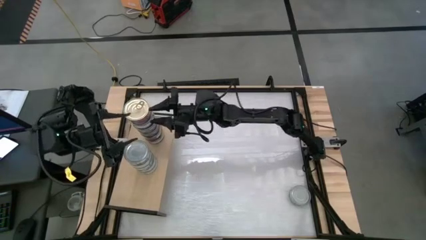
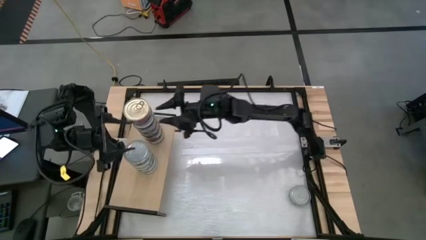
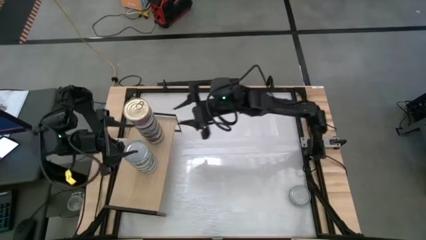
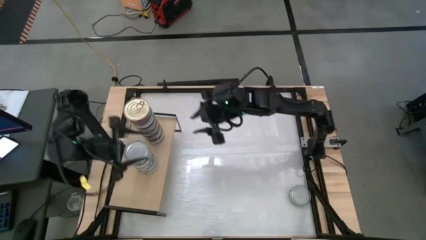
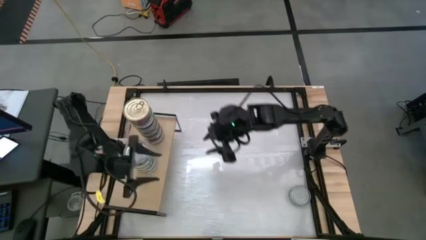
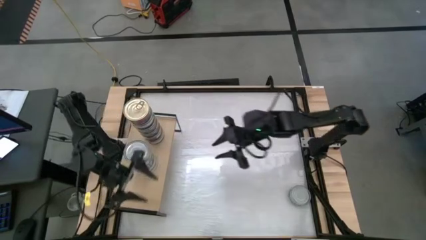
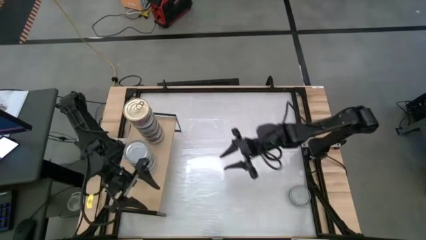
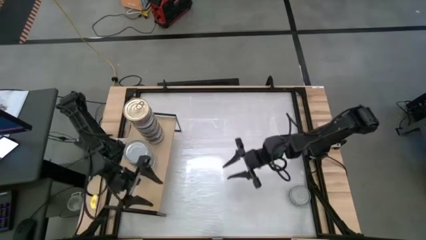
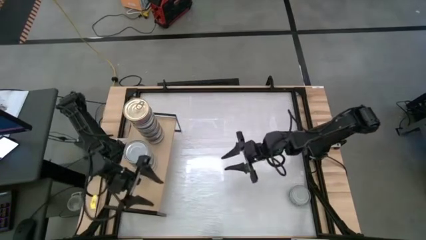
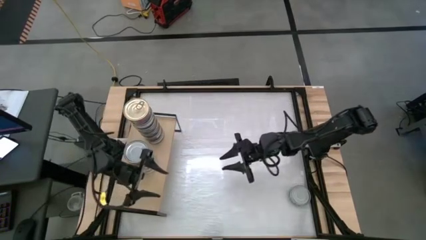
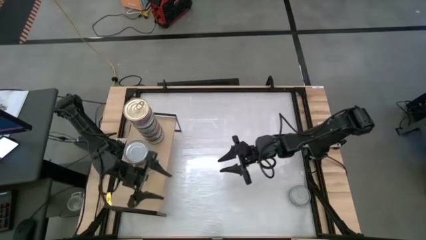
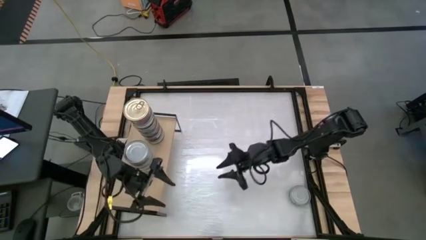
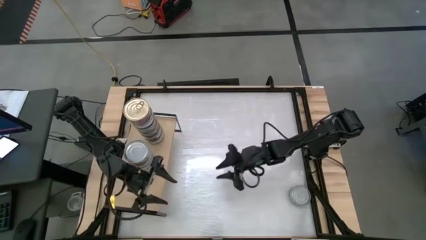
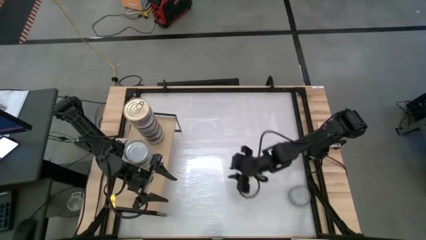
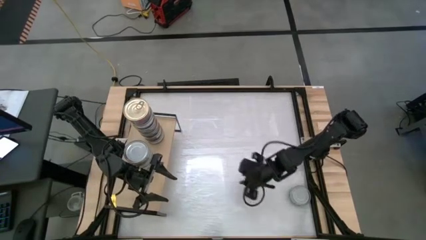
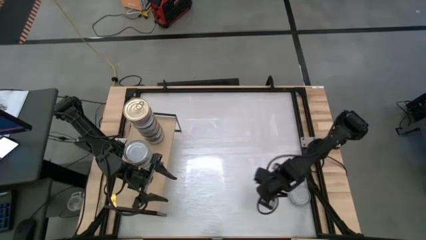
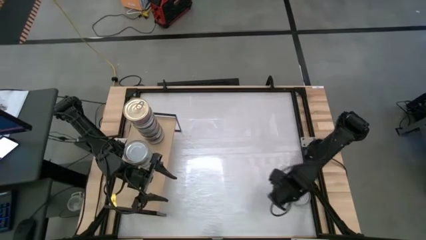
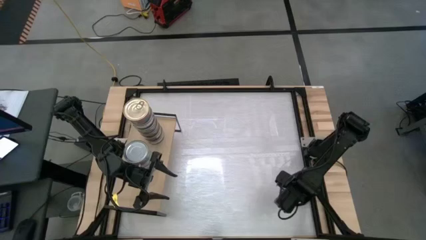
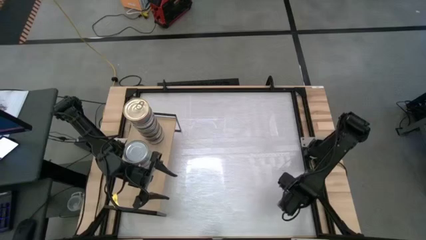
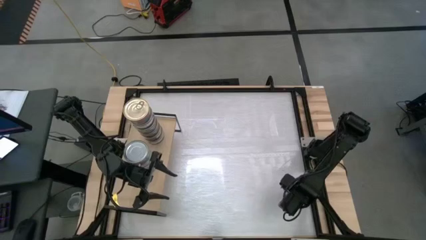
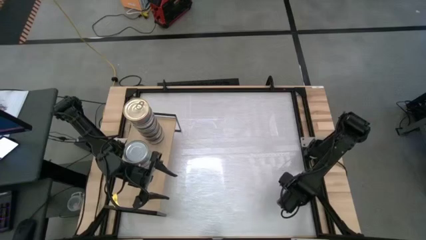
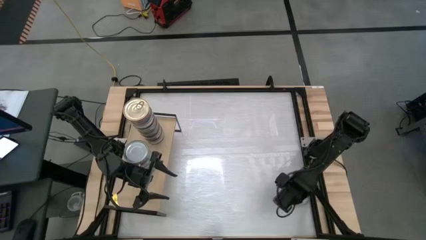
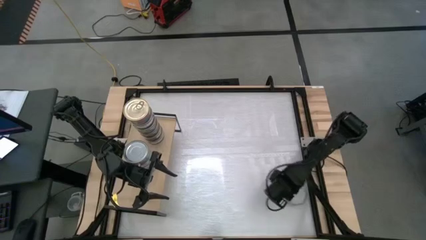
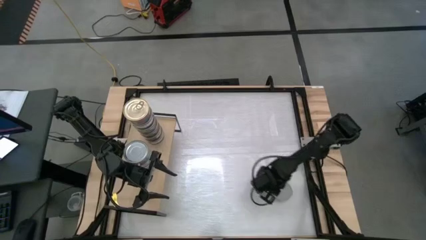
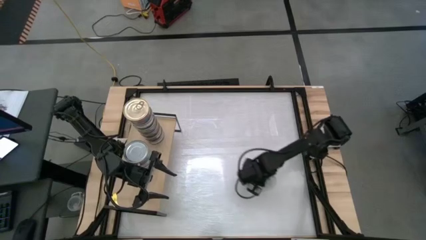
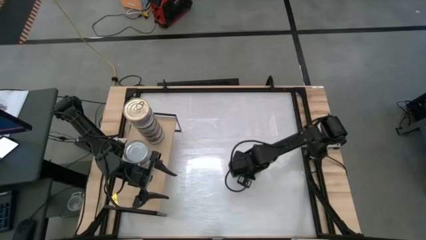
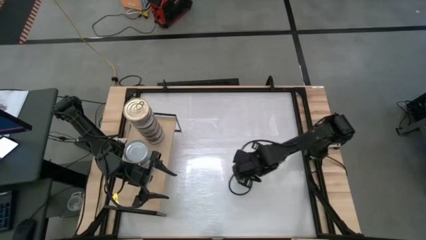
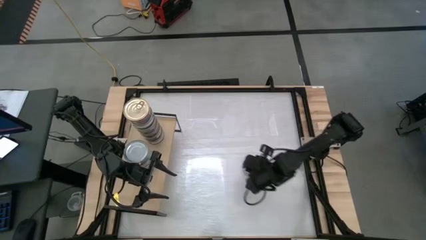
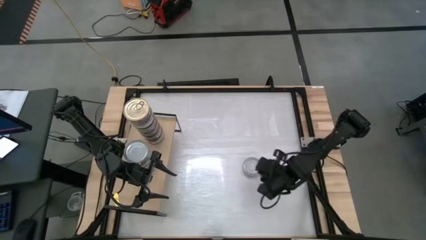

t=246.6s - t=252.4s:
Task: Stack canned seafood by type on shelf
Move the green tuna can to the middle right of the table

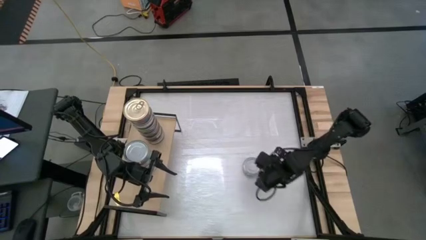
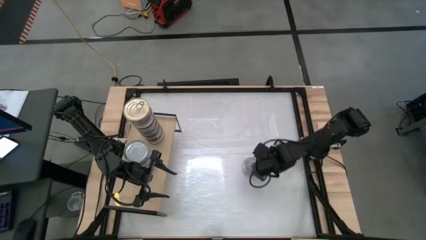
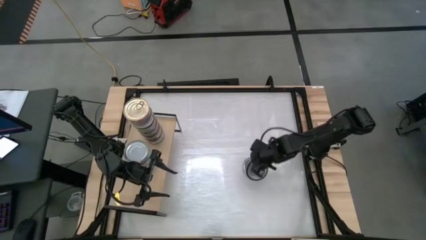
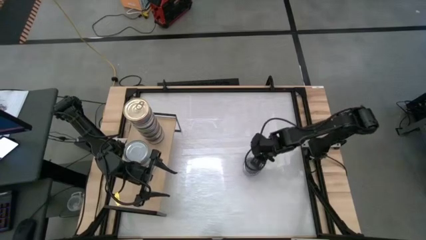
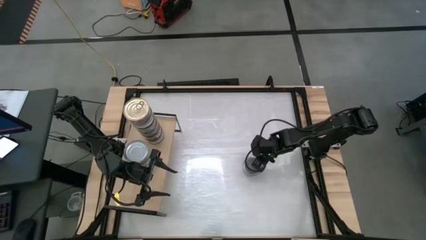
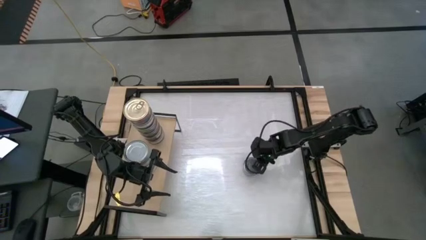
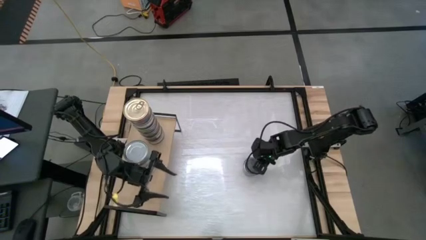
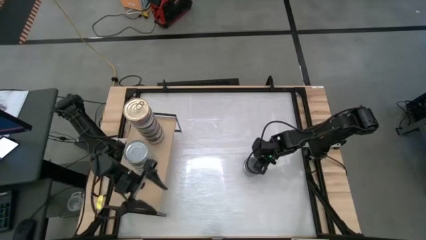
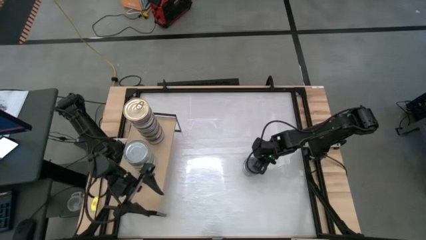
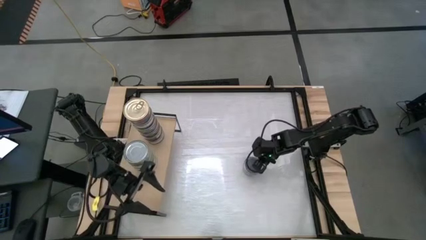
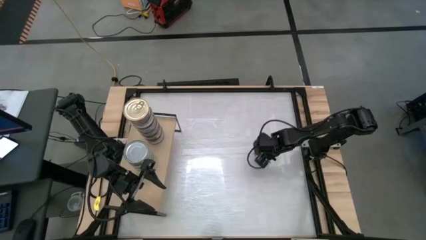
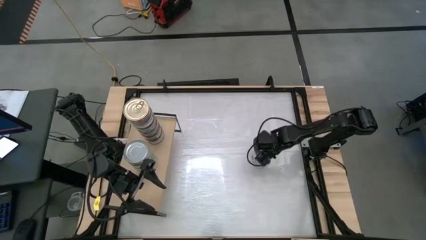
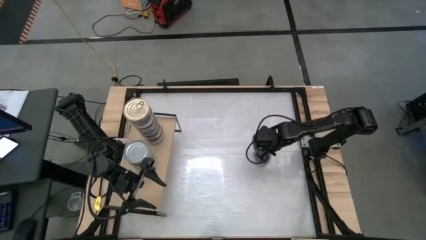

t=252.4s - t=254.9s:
Stack the green tuna can on top of the green tuna can on the shelf

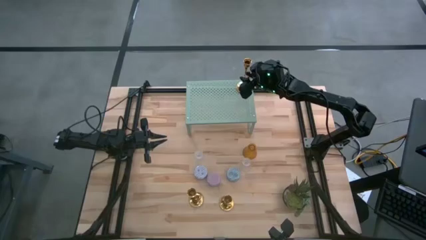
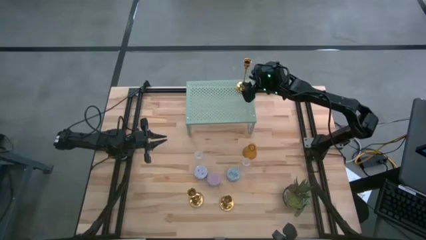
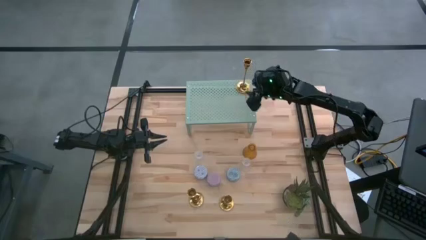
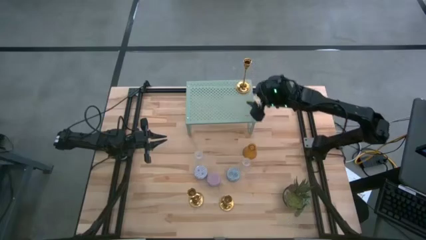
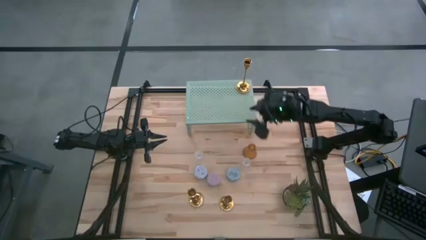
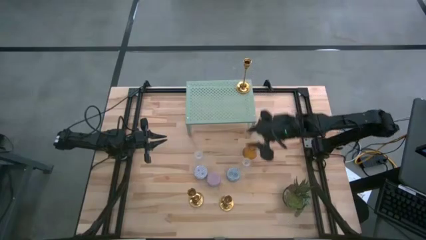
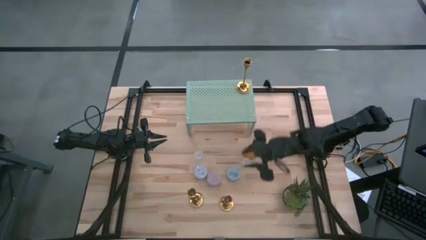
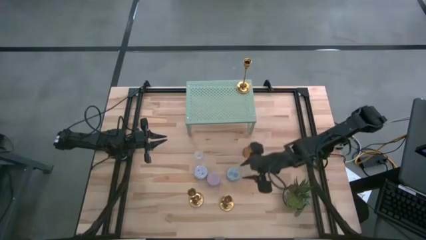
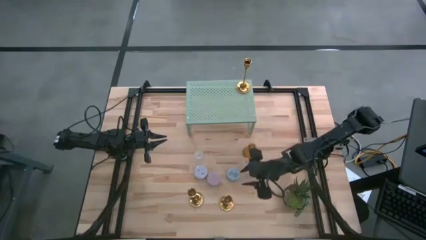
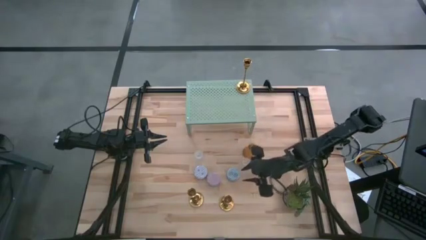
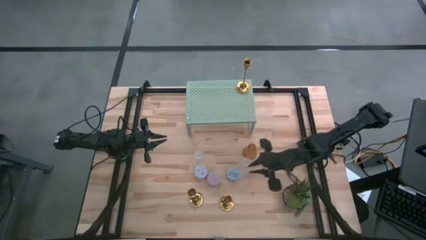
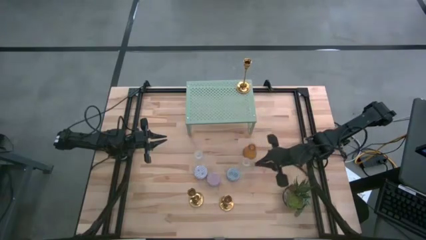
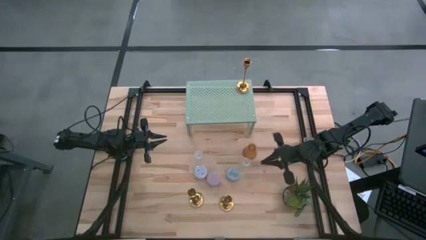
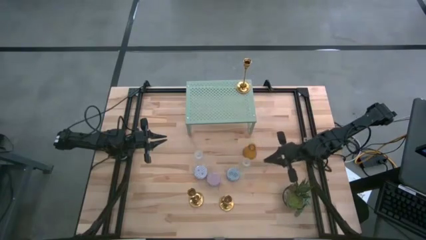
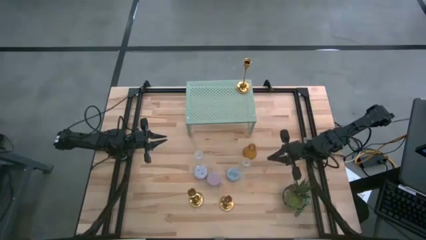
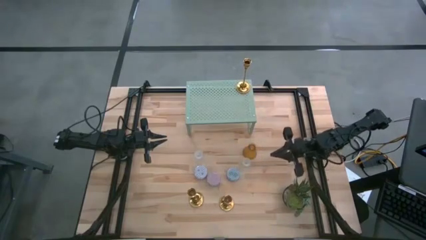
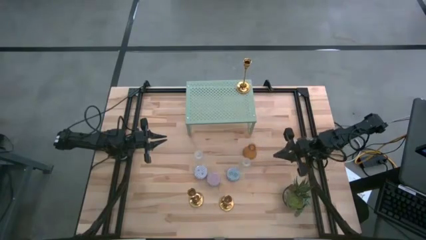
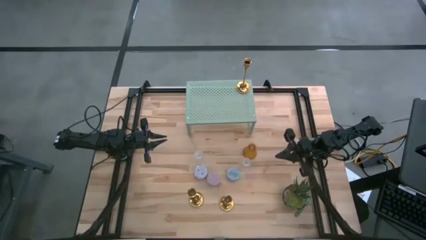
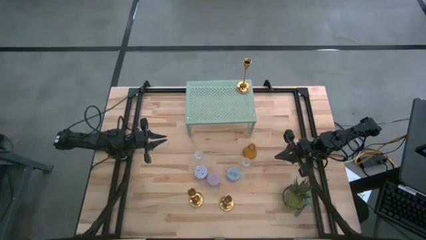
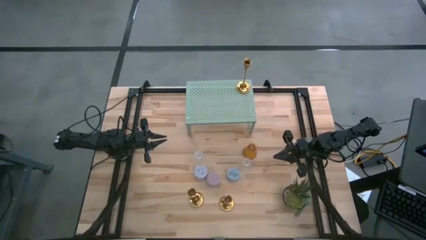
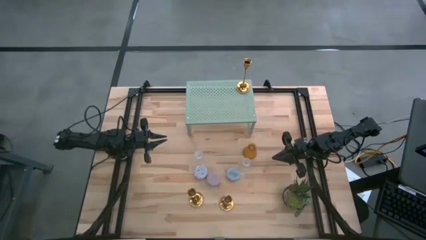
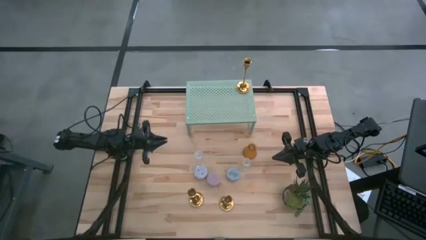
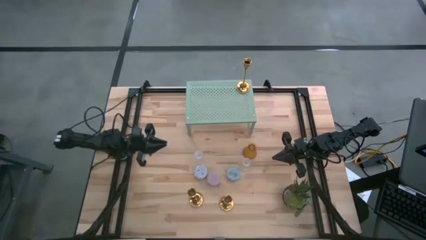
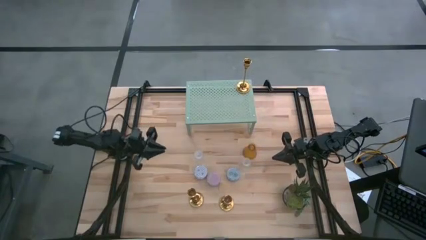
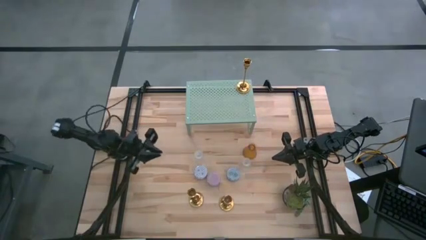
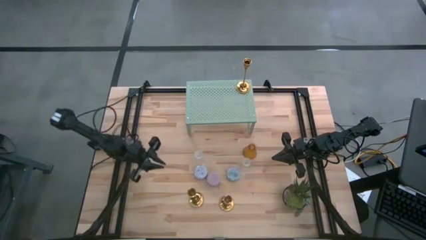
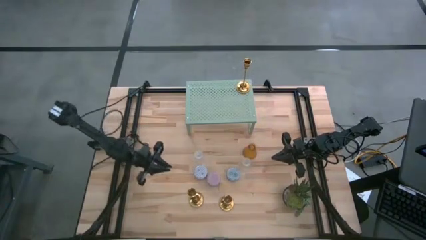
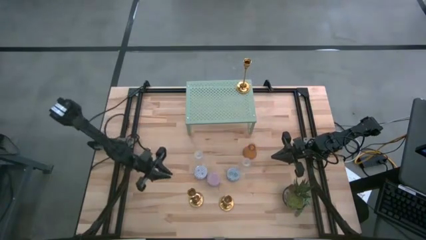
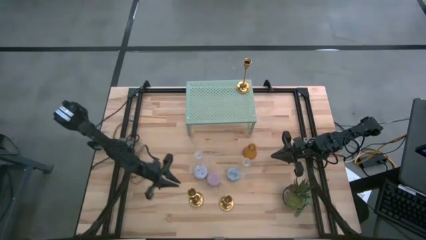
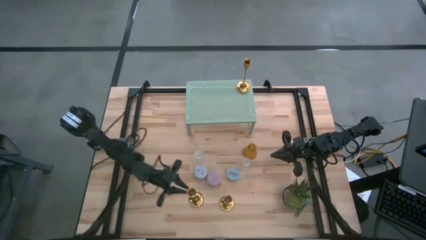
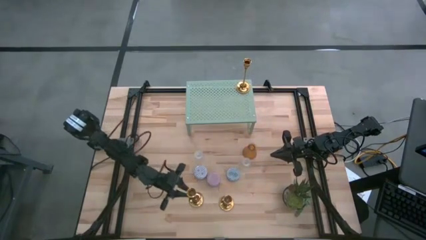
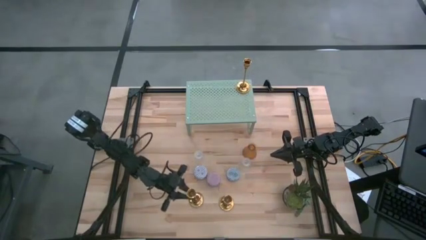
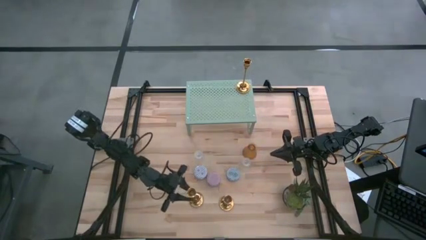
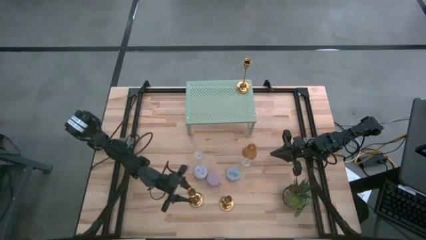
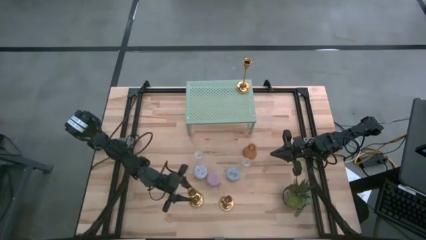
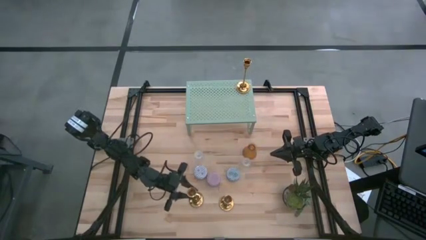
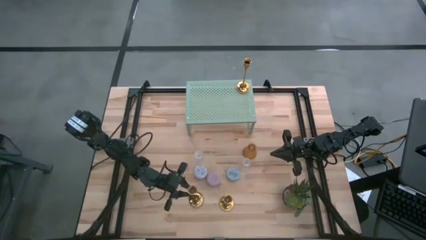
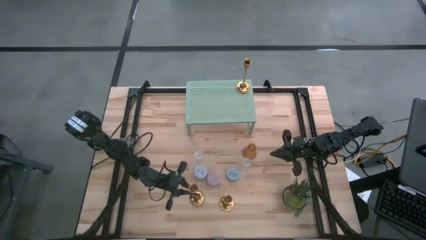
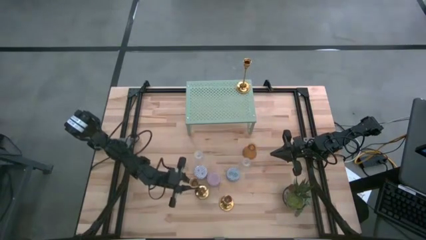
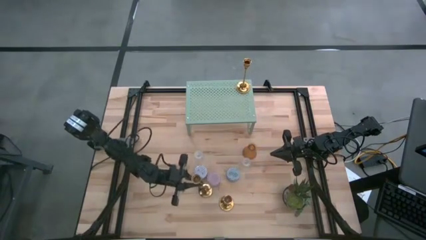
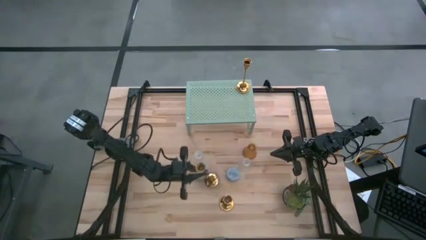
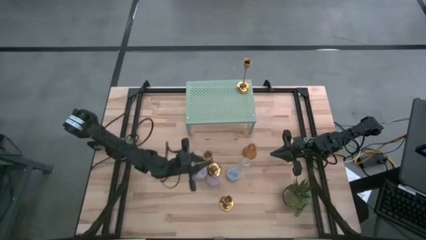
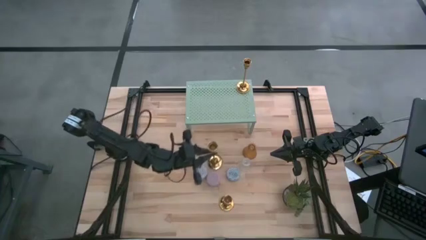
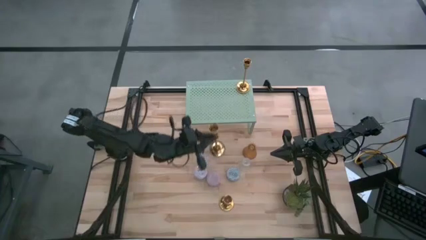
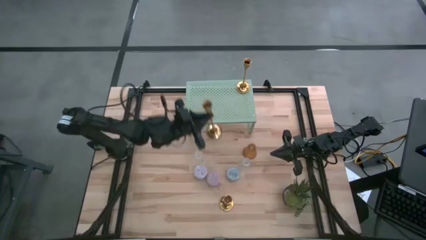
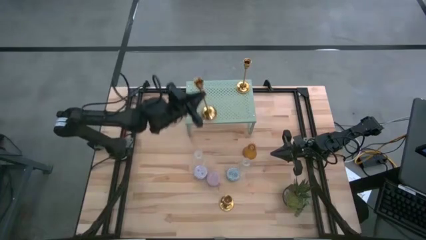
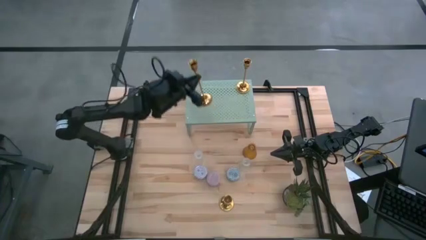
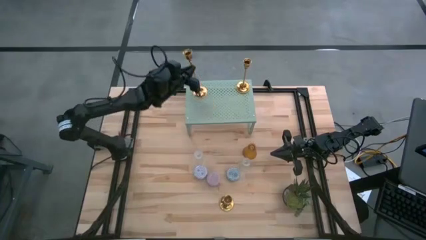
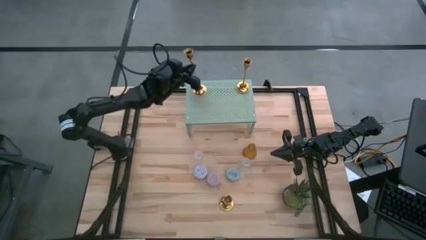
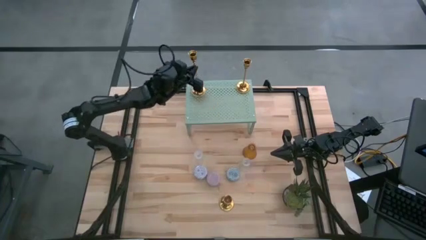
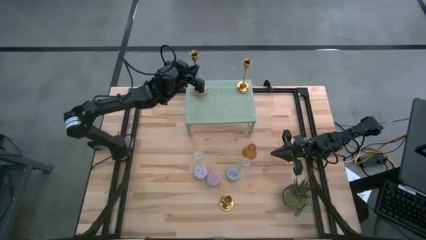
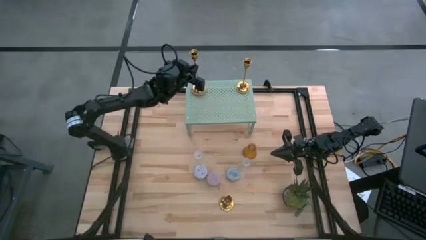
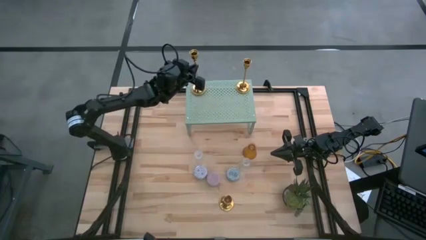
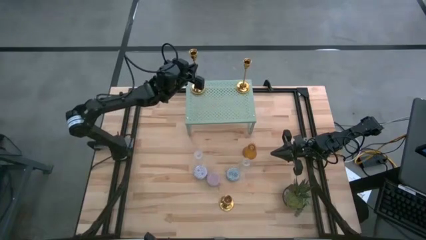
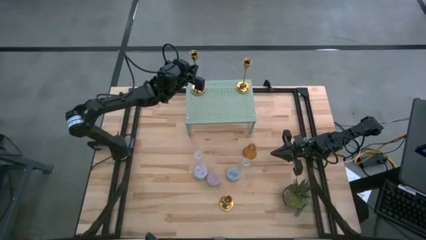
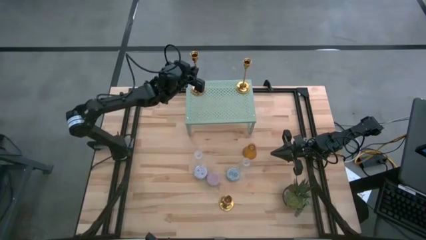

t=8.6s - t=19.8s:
Task: Pick & Place candle stick holders
Put the left gold candle holder on the shelf
